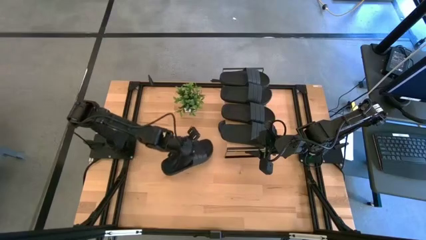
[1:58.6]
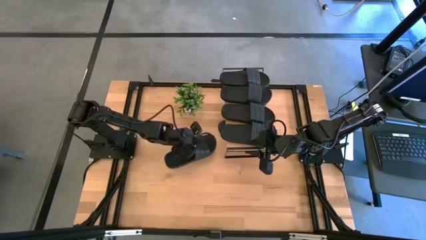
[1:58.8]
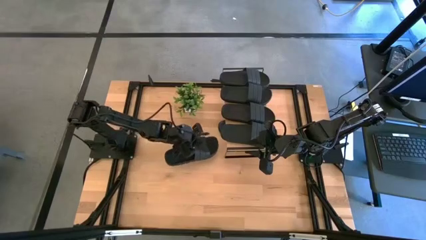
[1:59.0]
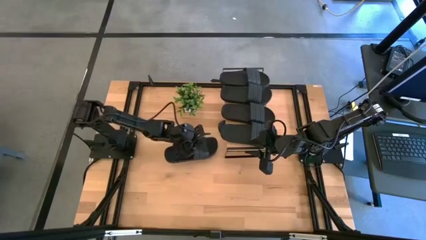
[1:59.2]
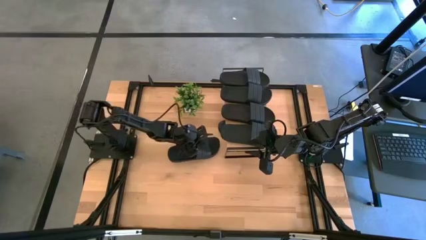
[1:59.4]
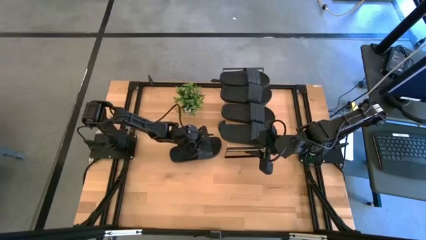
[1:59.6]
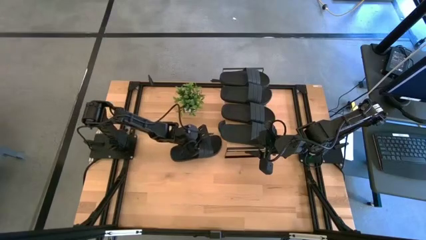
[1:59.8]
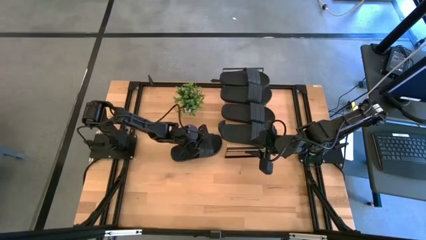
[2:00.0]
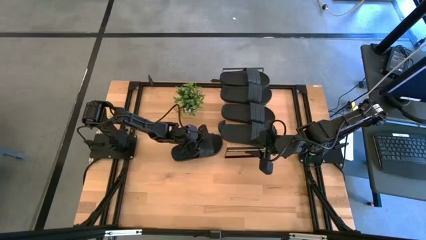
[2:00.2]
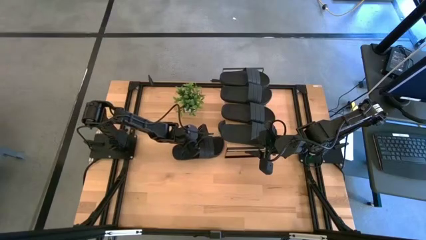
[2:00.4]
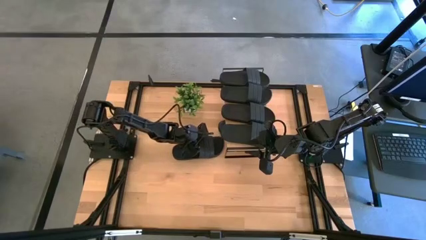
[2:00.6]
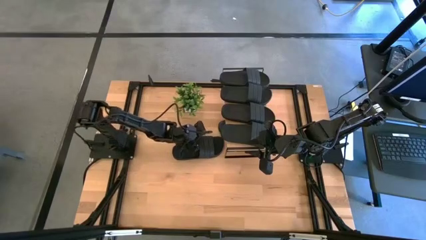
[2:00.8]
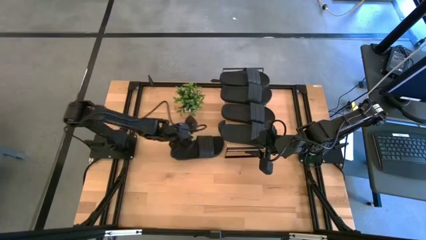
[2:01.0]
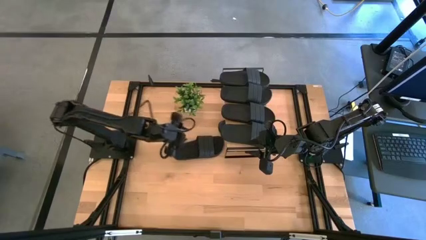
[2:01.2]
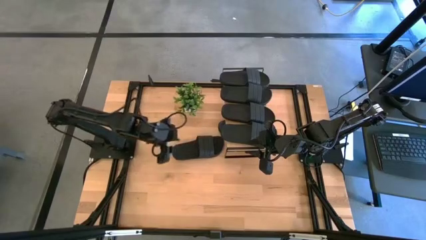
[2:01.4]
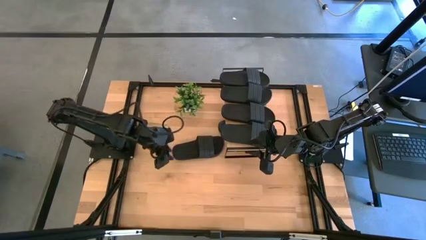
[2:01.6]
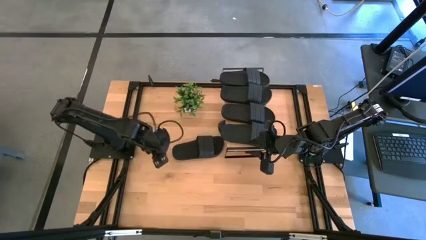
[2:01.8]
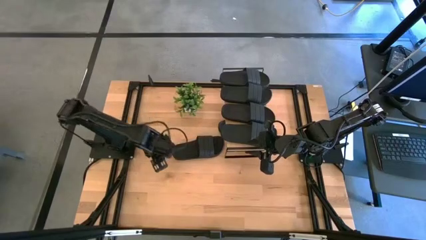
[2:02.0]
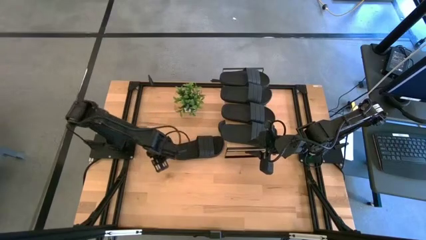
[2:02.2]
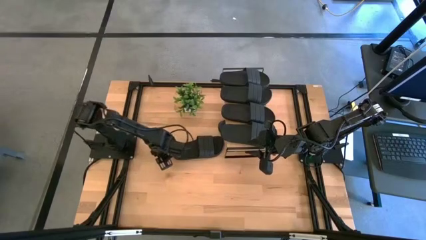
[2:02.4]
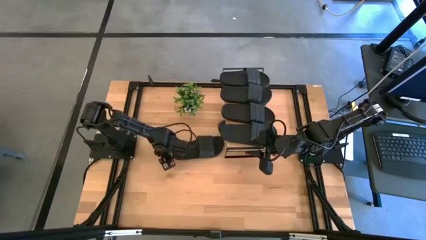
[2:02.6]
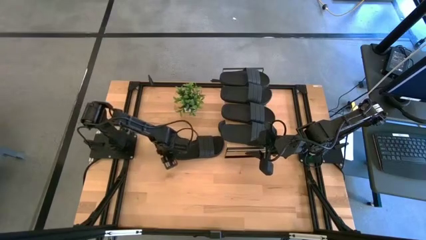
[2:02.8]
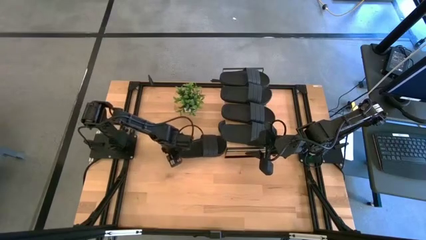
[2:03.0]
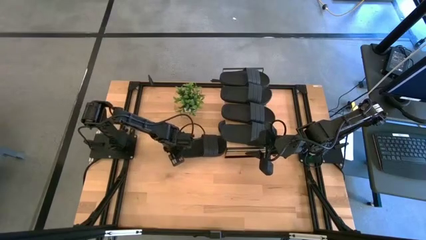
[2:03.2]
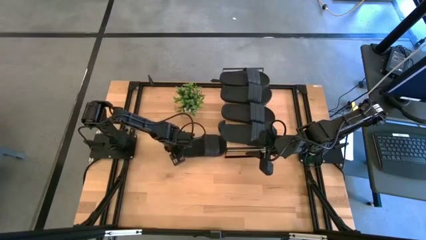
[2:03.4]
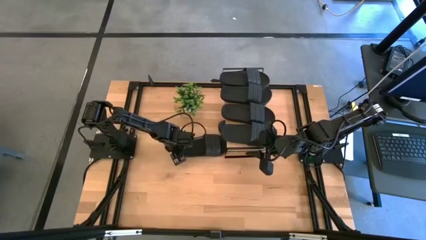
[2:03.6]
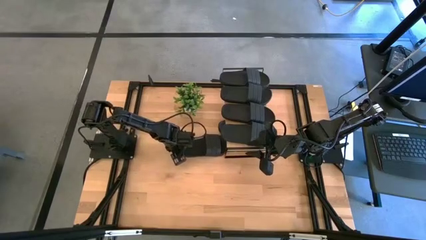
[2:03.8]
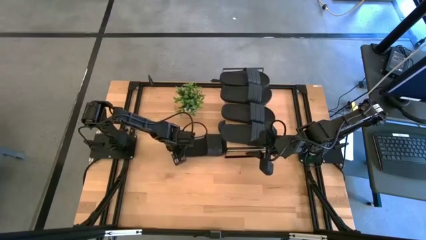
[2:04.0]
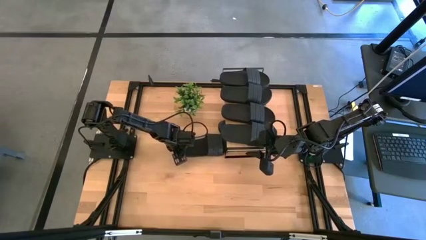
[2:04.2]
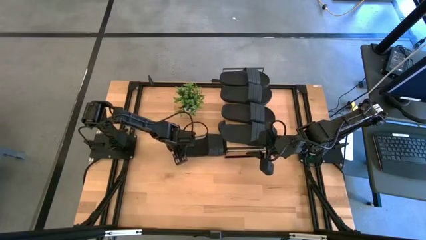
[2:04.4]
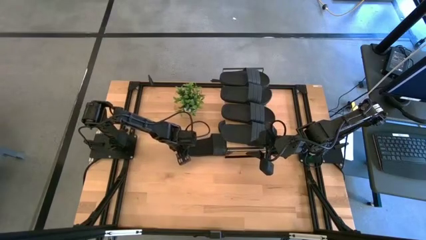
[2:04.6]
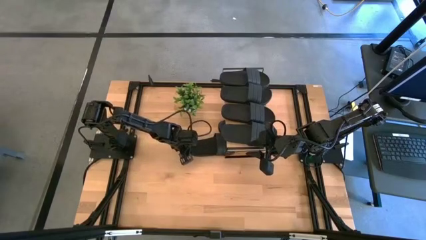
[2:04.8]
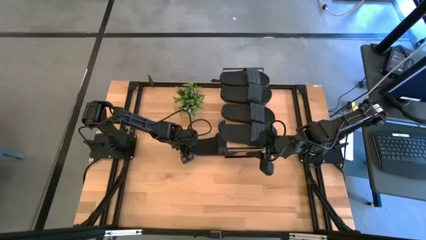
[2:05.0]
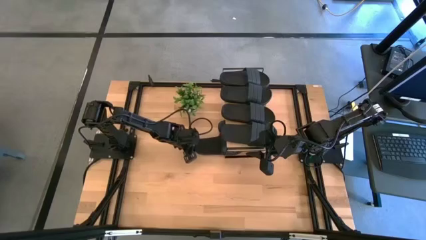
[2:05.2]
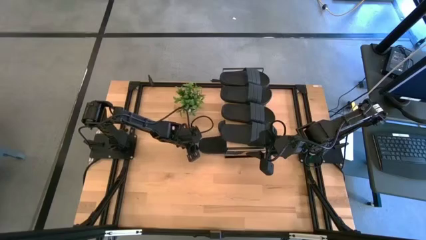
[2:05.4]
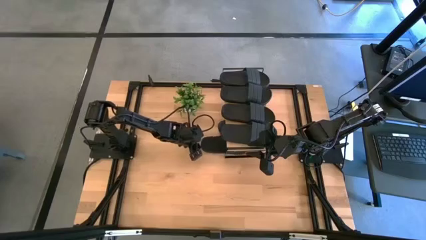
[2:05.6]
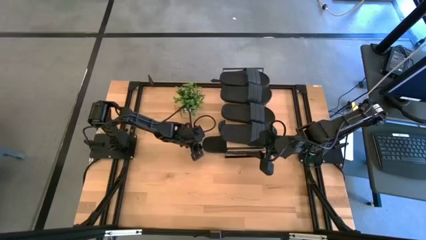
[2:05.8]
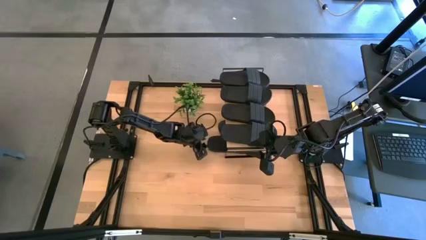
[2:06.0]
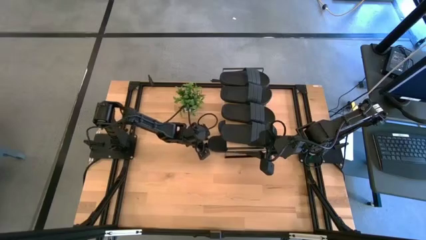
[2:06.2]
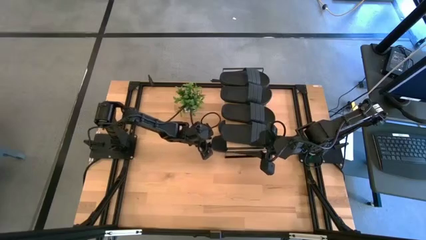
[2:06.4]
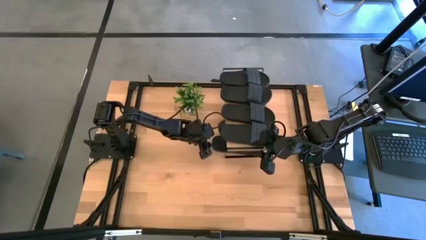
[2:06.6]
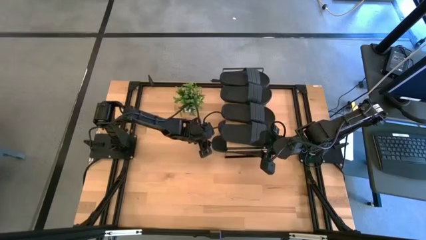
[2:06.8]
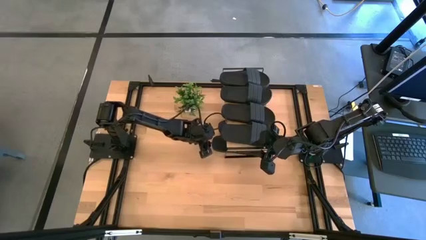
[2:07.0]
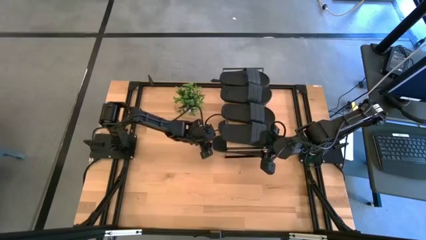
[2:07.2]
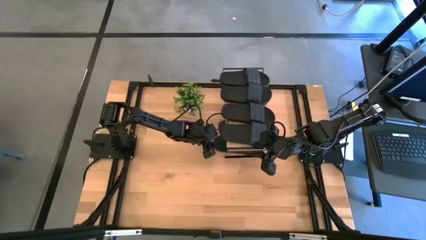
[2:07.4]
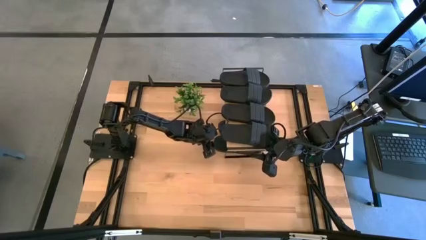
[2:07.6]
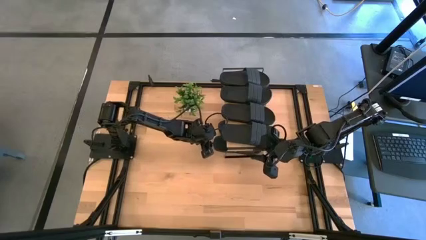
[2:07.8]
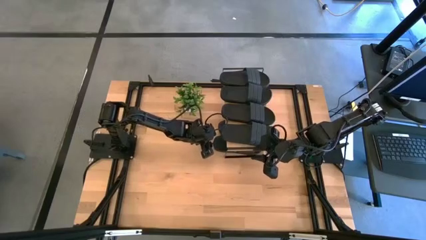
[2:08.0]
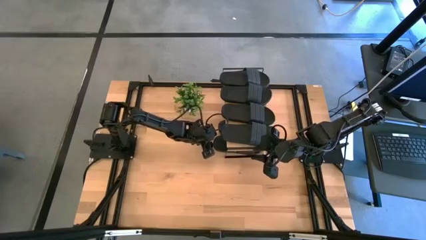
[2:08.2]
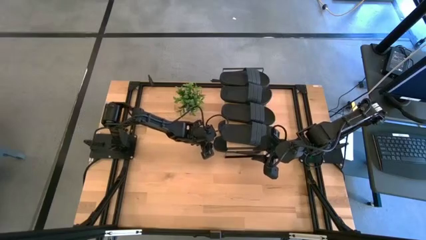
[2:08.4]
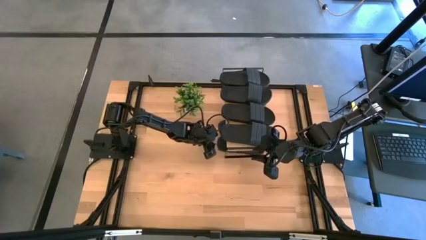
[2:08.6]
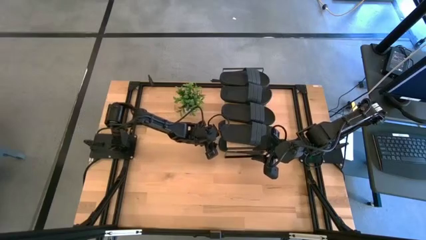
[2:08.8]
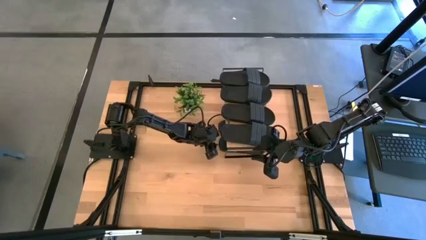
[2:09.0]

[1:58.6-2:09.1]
Task: Pick and place slides into the shelf
Put the black slide under the shelf

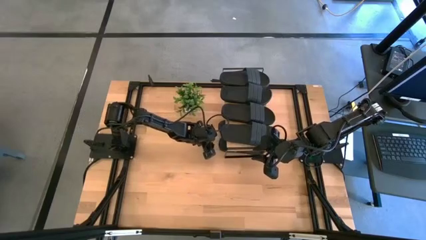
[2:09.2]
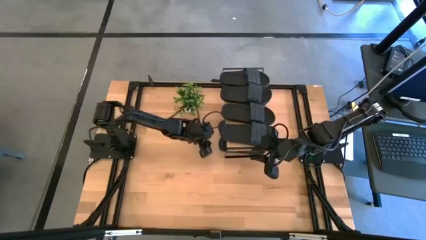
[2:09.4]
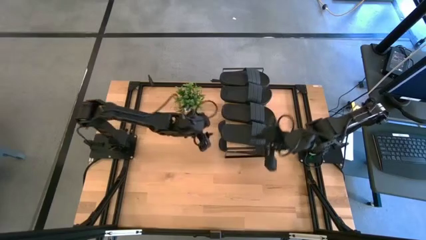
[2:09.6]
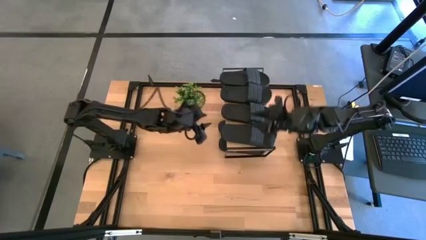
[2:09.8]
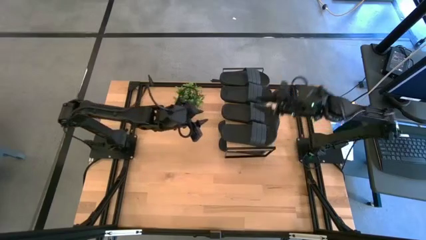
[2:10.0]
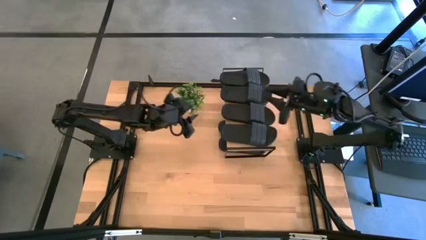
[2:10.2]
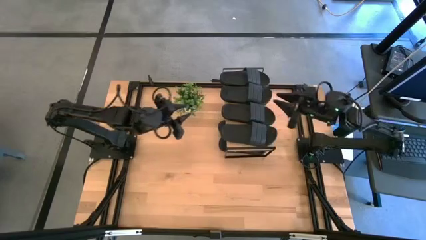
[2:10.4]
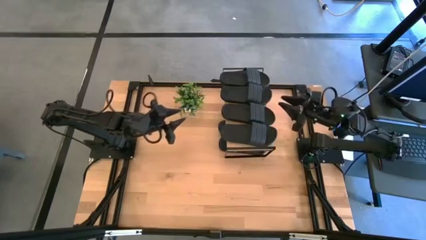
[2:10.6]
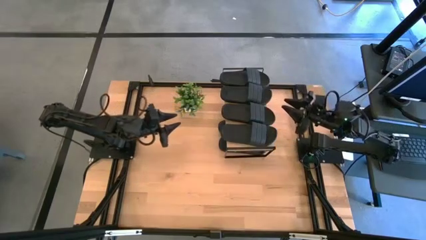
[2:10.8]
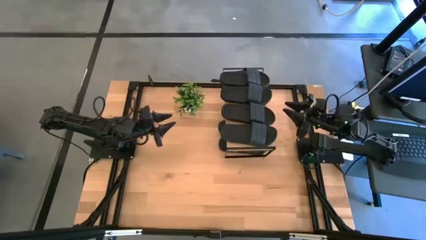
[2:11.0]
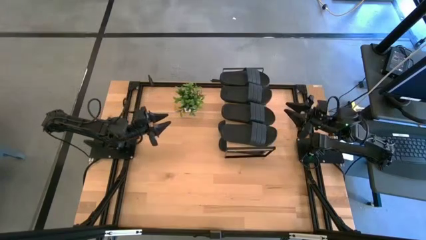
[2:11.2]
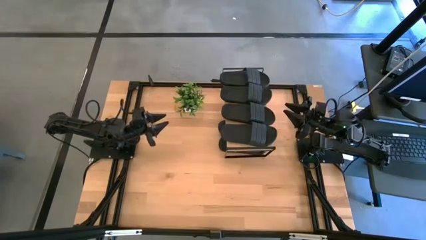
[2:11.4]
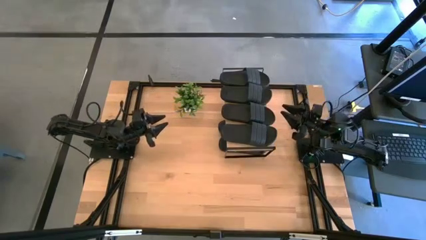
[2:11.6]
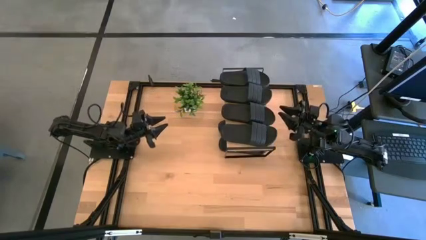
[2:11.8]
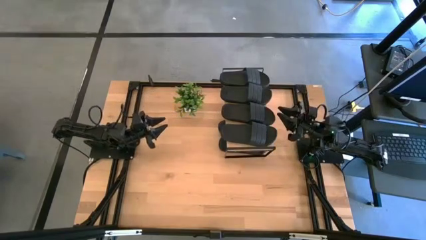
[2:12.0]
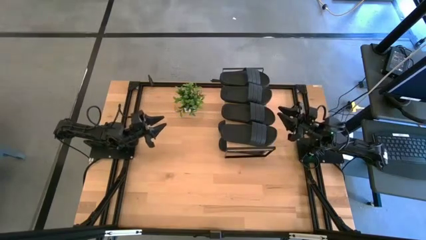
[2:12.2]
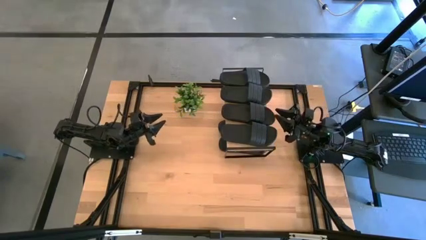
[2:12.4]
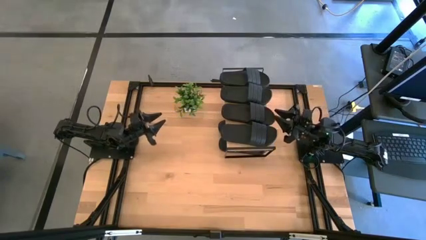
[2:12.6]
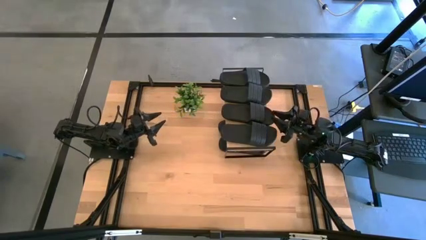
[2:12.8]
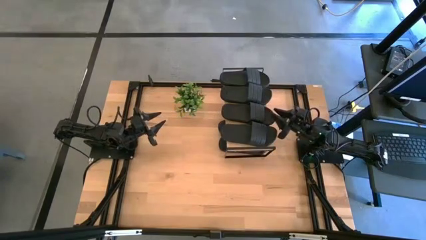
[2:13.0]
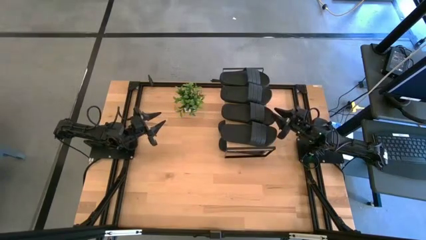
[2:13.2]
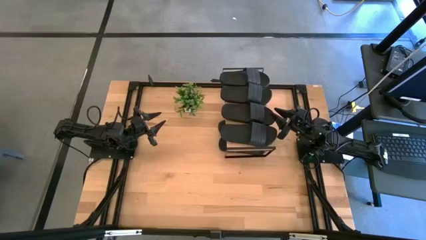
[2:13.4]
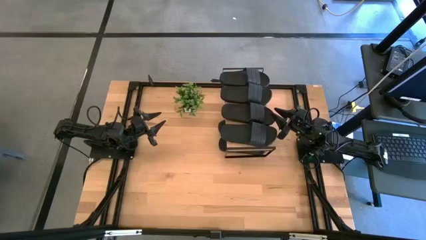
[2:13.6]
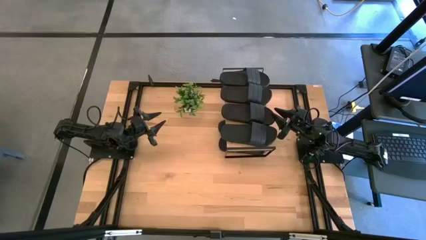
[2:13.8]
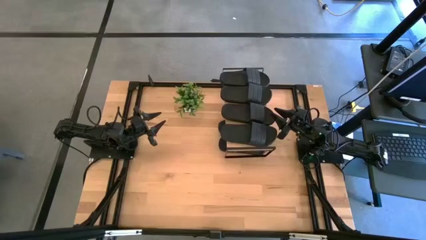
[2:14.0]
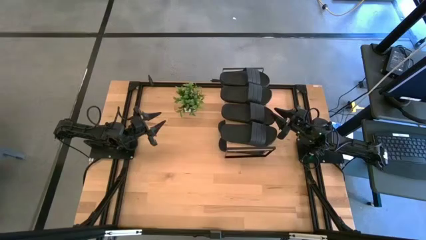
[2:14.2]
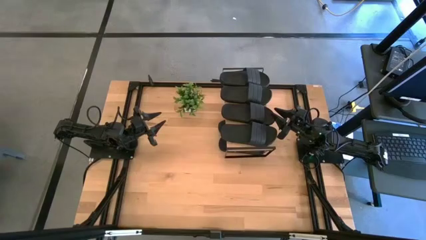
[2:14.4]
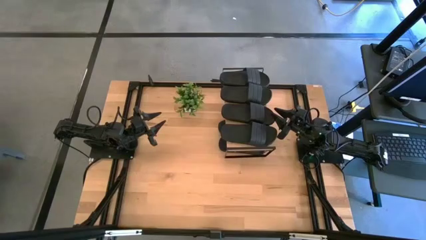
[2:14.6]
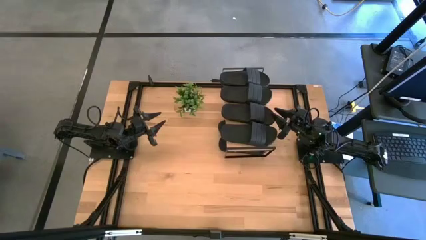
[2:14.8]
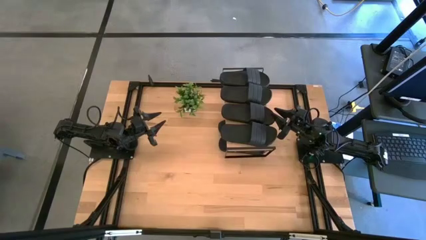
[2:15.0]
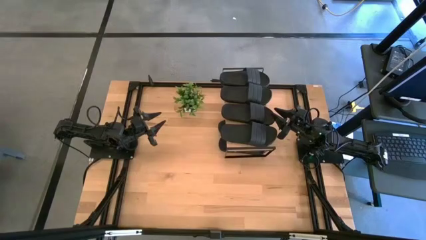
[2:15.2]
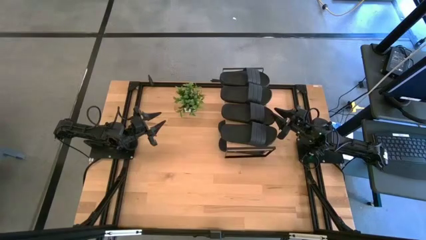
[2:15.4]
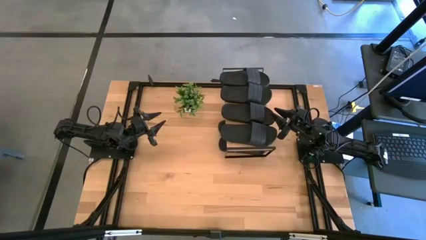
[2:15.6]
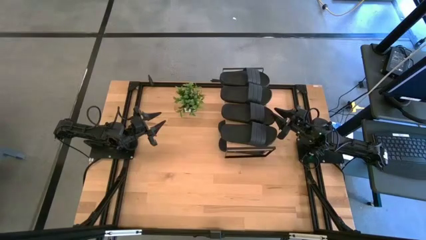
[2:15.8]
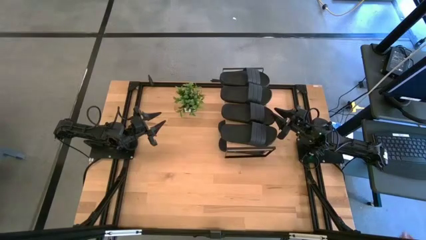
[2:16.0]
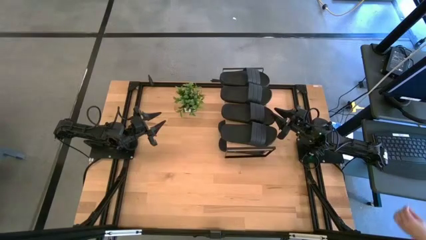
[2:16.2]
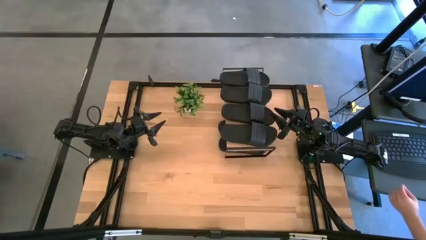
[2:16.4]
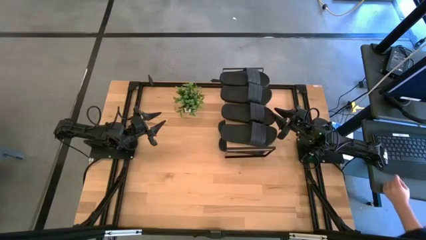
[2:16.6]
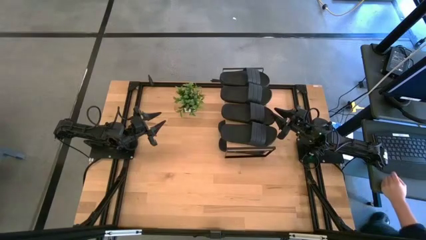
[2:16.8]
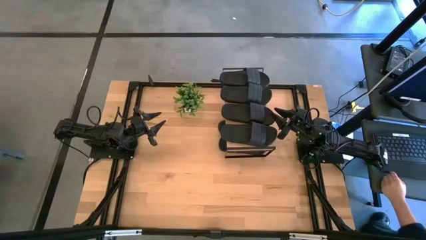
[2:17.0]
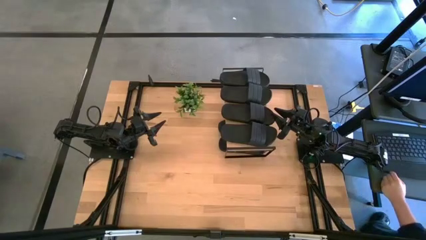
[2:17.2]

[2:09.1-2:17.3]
Return to Home position
